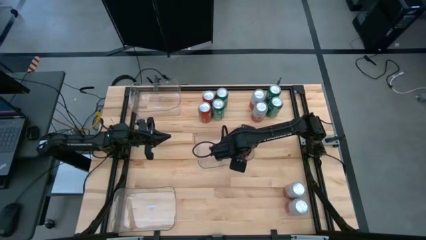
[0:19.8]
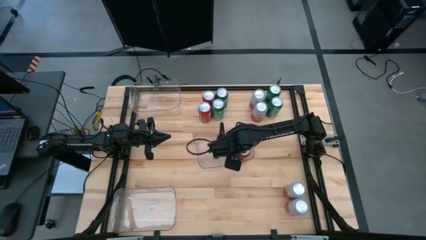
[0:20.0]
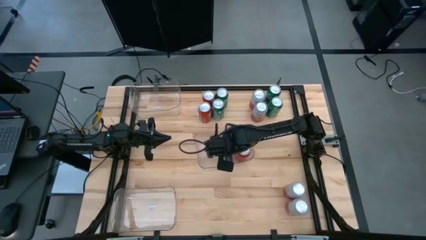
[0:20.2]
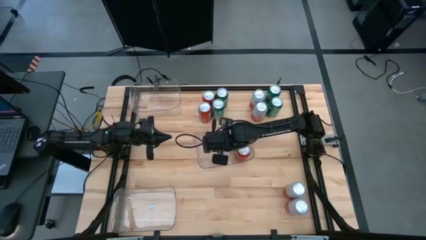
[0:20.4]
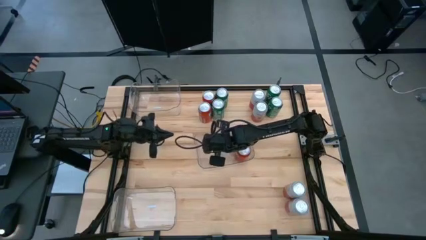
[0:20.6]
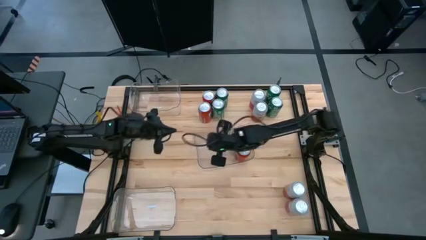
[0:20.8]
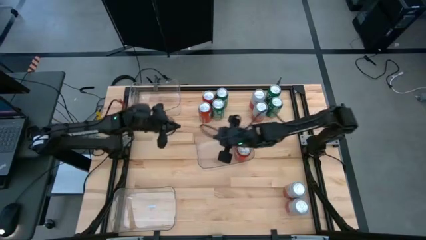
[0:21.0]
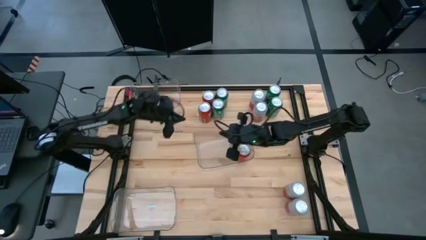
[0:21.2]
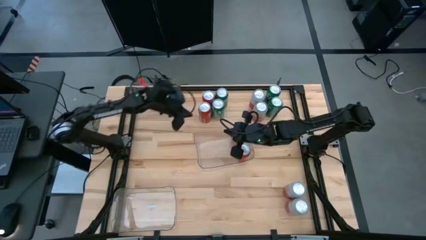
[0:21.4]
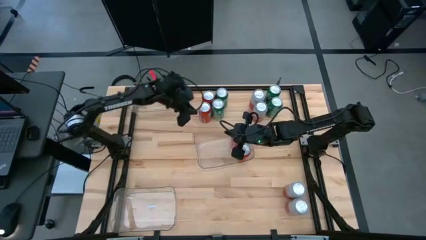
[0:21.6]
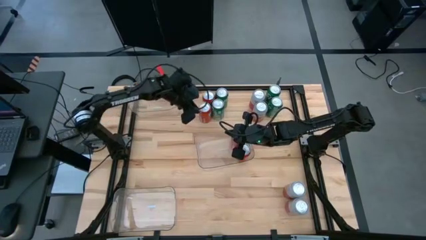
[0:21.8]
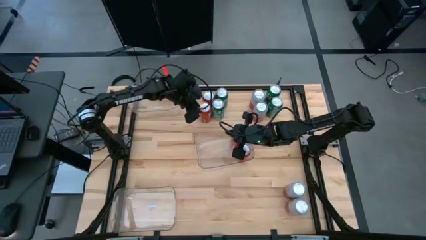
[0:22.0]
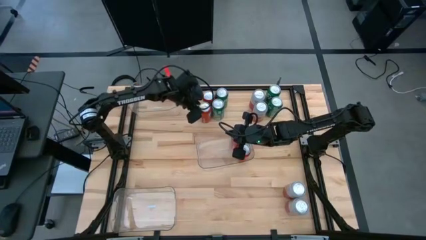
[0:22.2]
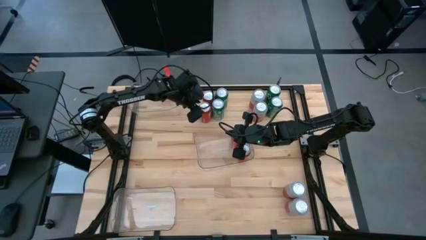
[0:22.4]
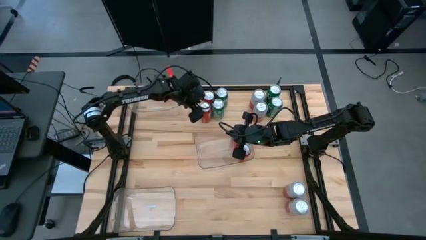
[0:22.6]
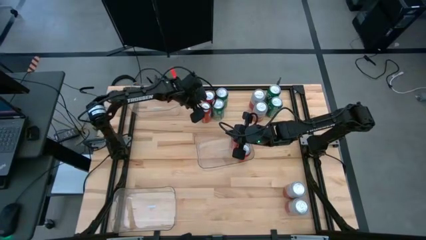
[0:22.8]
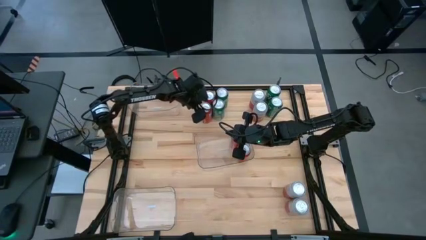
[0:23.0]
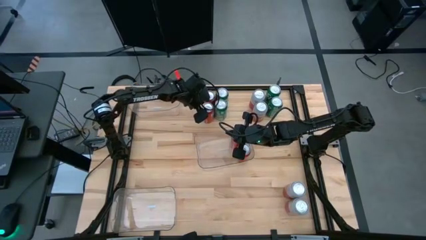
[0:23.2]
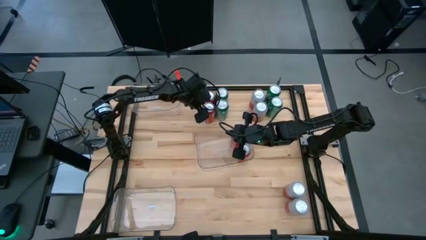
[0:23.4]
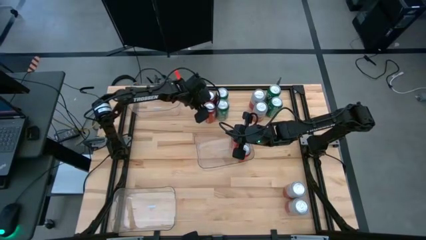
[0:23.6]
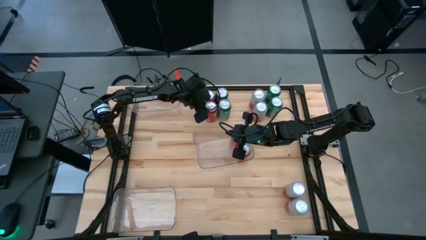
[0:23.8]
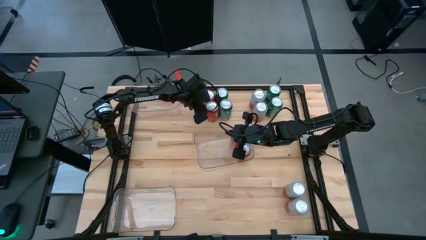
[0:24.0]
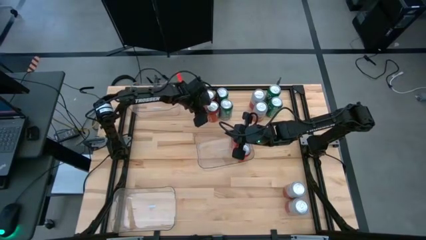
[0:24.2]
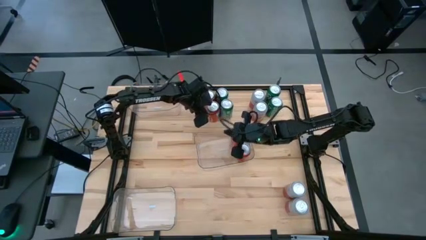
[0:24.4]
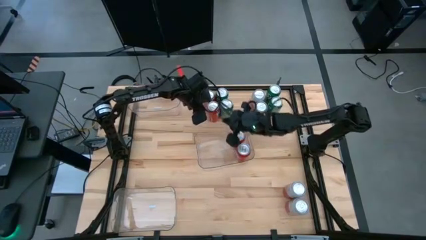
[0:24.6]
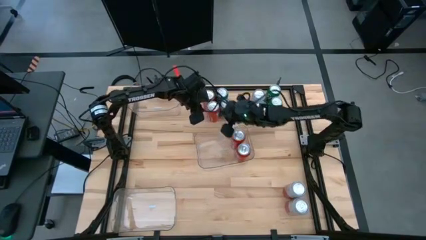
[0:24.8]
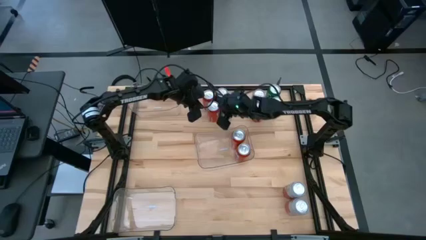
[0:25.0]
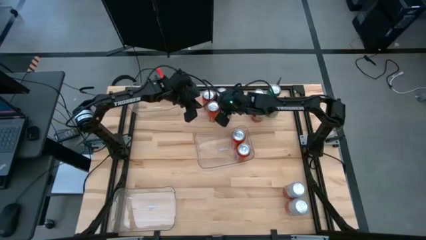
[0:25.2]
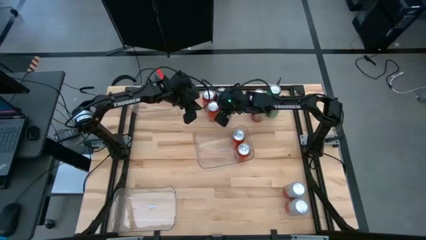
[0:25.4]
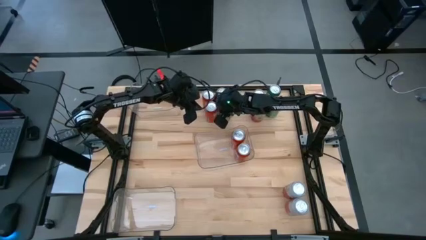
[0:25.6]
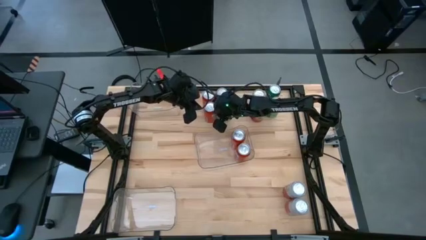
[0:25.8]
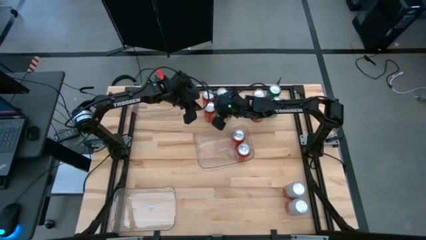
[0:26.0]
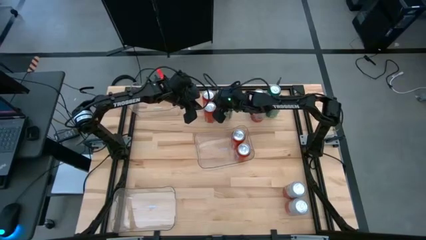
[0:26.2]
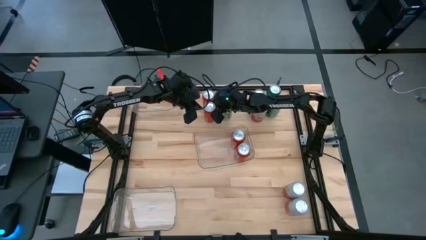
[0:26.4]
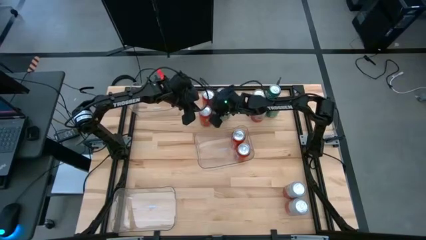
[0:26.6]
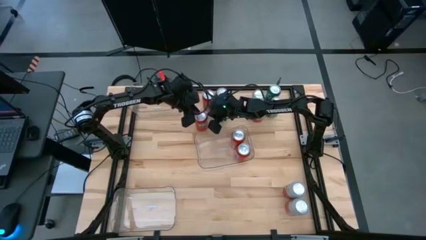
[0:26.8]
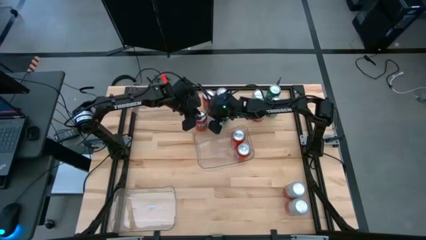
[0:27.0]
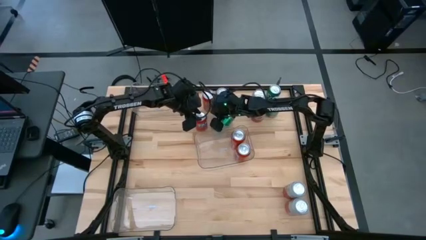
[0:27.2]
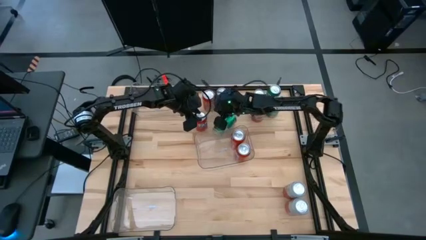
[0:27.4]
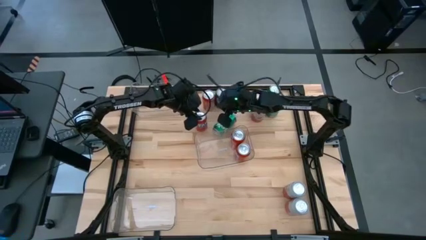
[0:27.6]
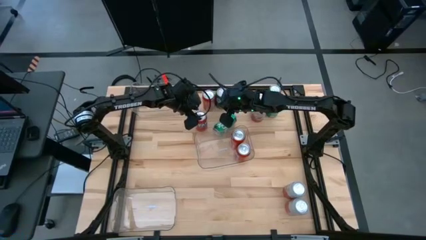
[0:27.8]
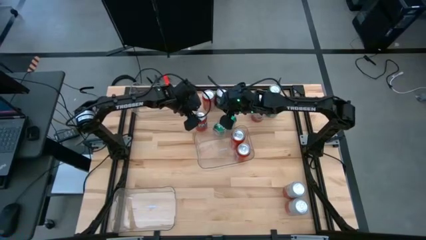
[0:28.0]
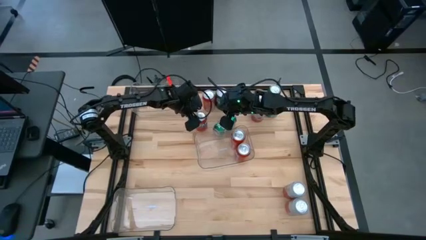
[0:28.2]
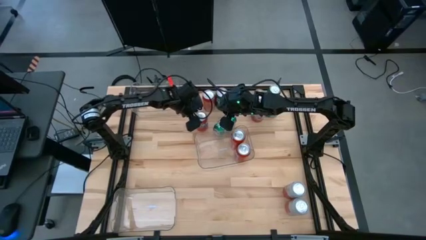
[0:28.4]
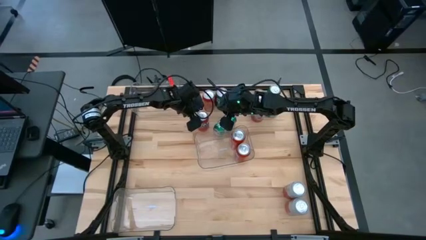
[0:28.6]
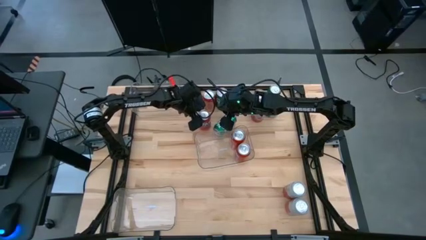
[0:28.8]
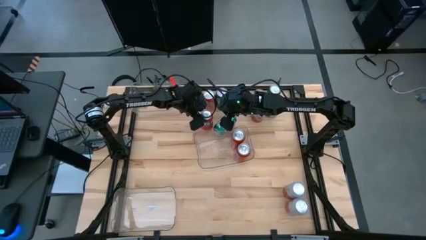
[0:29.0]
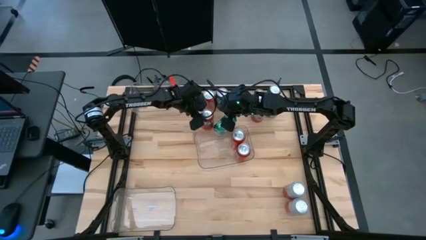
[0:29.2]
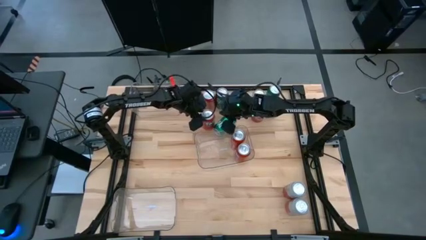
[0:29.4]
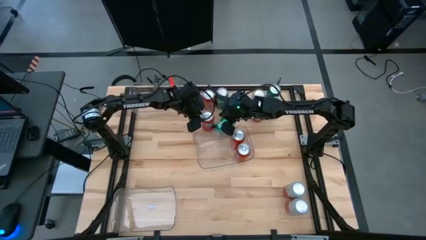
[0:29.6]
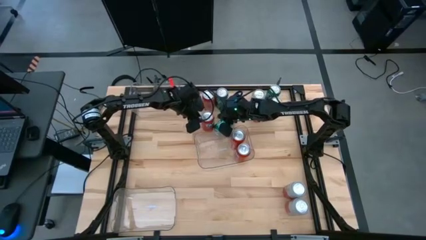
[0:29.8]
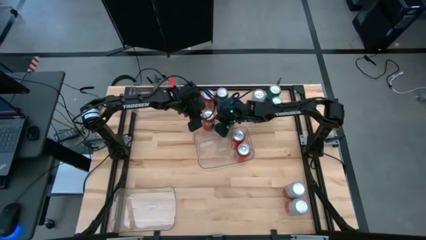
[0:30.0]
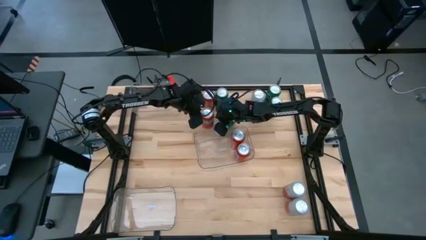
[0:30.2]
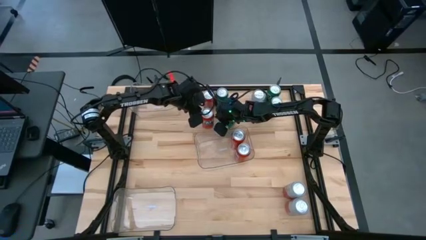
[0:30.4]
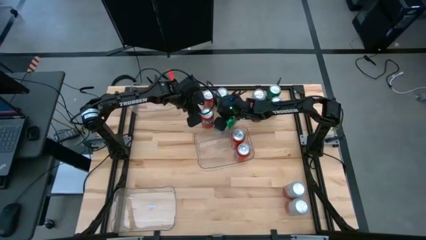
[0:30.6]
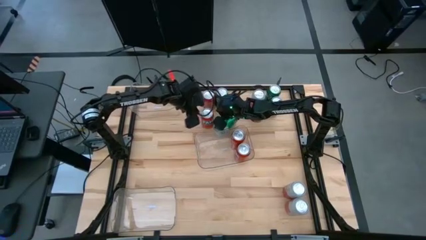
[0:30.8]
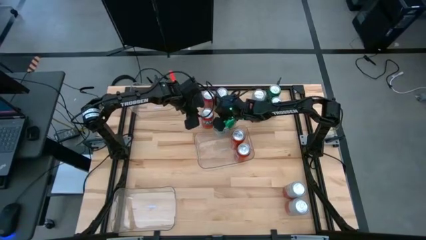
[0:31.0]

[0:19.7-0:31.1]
Task: Sort soda cans
Put the orange soda can into the middle transparent bin

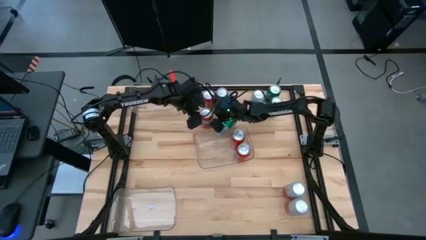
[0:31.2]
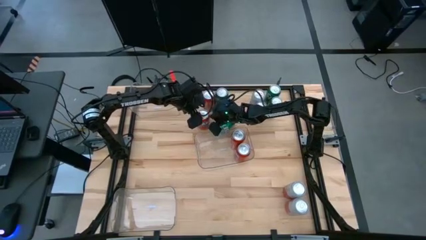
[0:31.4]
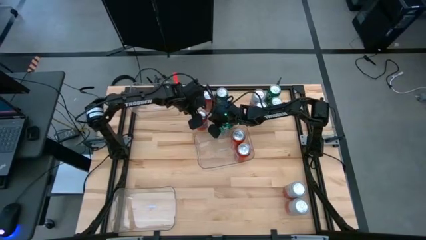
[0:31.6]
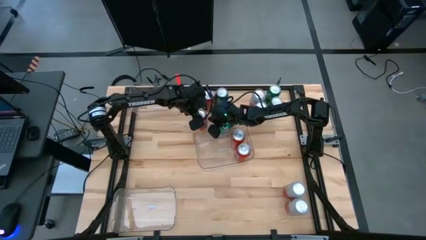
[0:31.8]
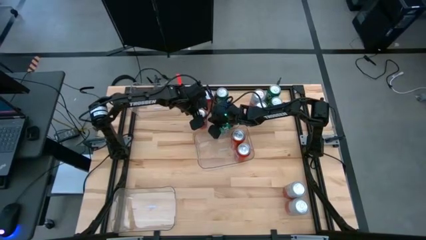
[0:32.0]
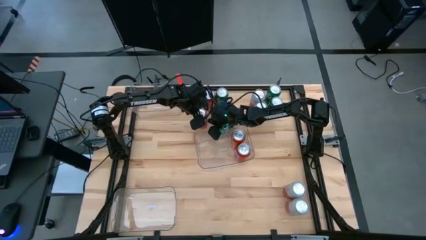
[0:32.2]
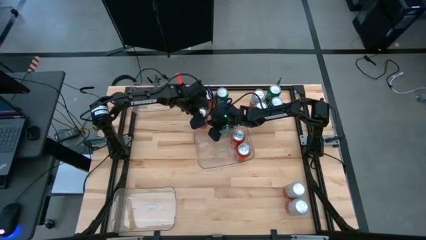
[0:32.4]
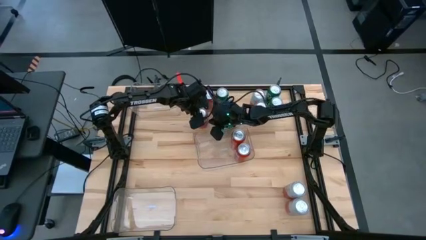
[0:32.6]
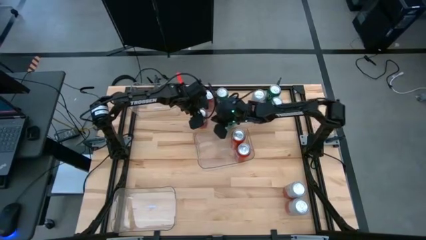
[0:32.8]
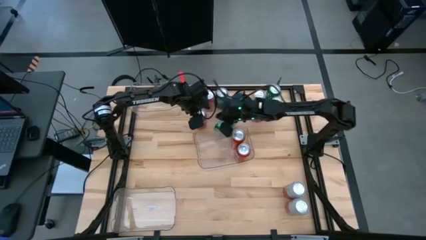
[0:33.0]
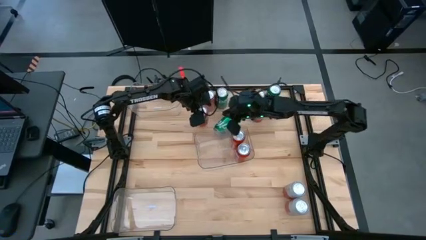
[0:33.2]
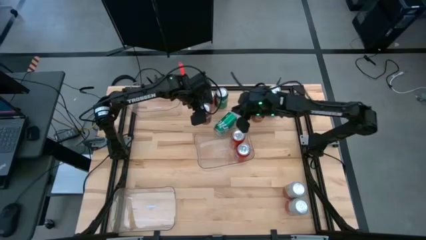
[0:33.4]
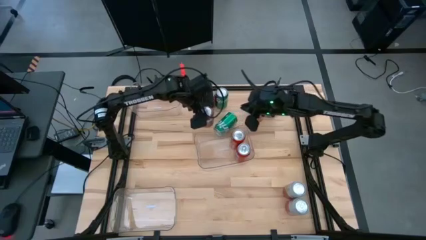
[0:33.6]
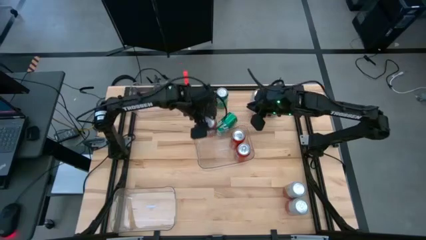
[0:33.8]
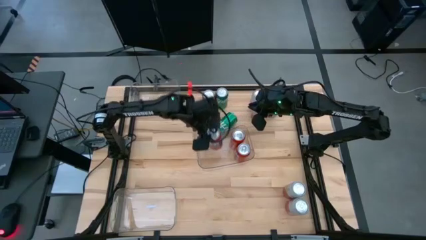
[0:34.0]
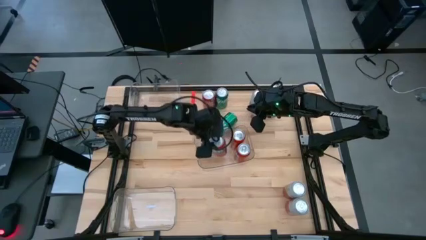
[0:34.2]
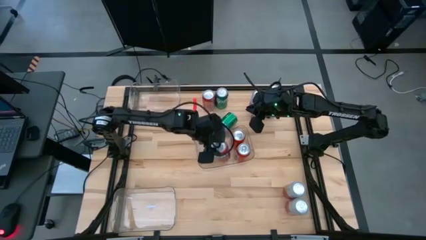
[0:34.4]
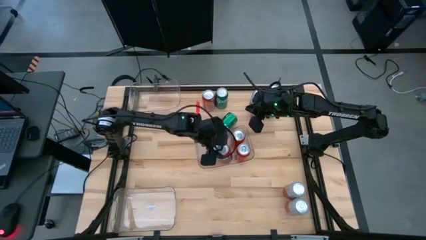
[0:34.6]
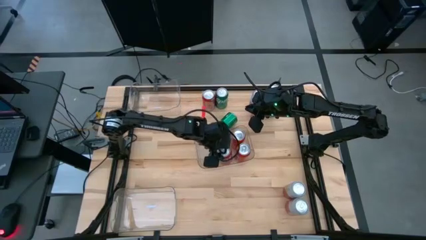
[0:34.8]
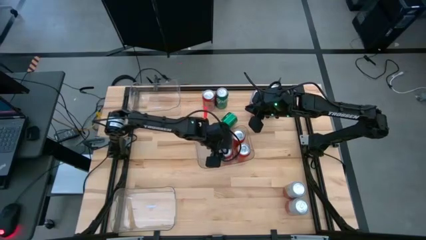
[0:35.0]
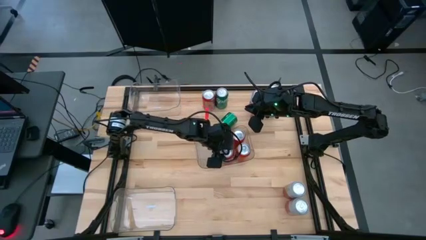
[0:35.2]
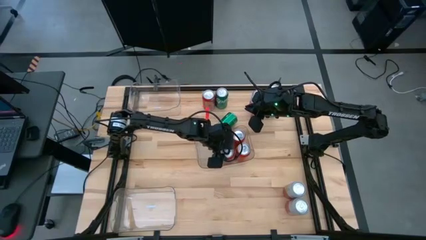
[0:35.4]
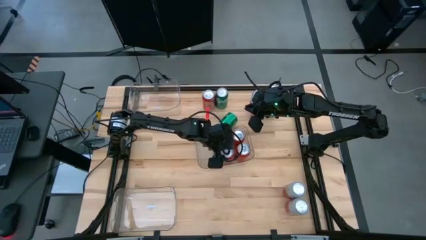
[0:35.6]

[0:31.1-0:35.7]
Put the orange soda can into the middle transparent bin
